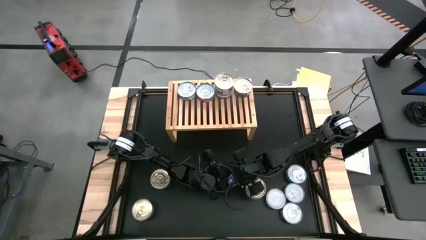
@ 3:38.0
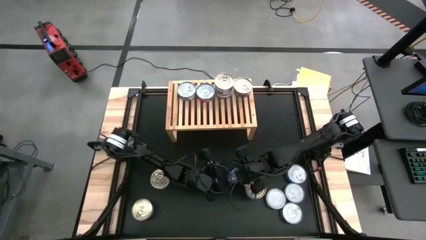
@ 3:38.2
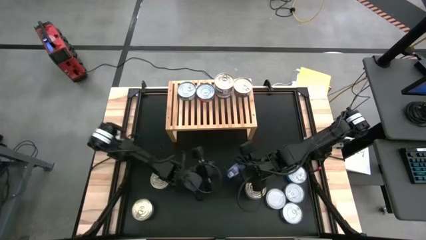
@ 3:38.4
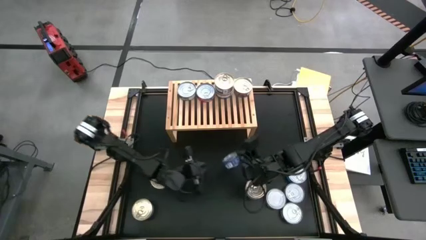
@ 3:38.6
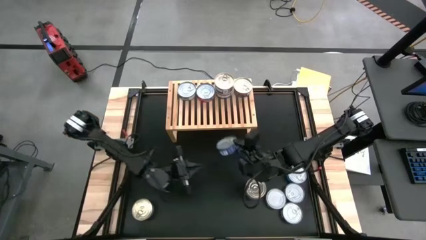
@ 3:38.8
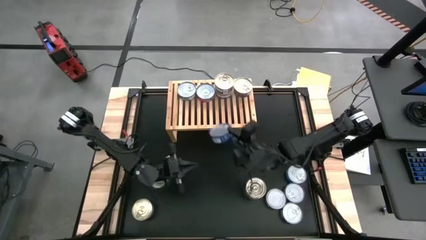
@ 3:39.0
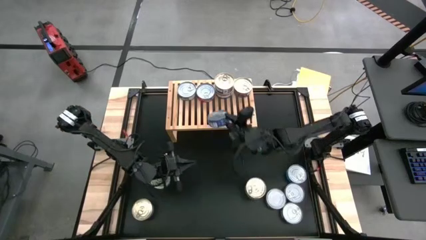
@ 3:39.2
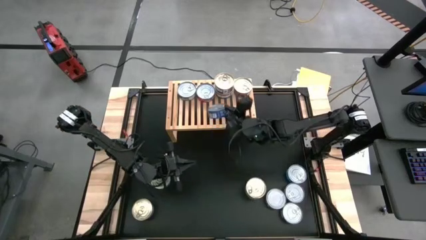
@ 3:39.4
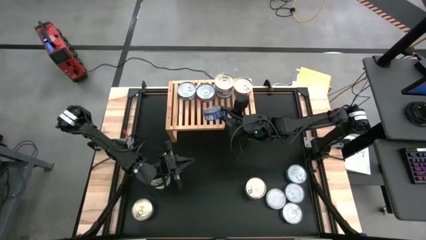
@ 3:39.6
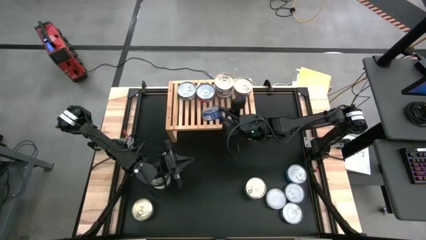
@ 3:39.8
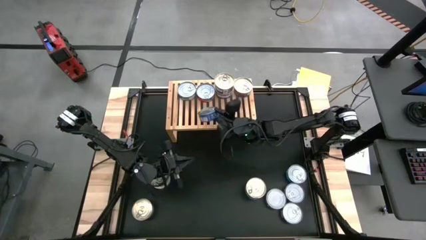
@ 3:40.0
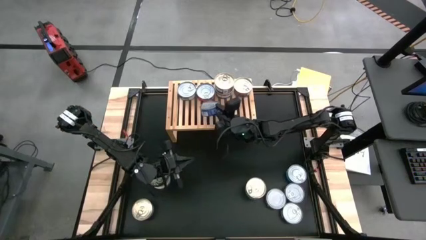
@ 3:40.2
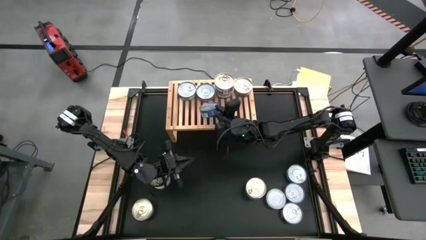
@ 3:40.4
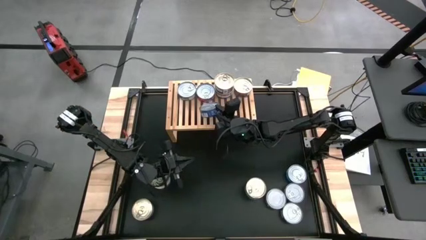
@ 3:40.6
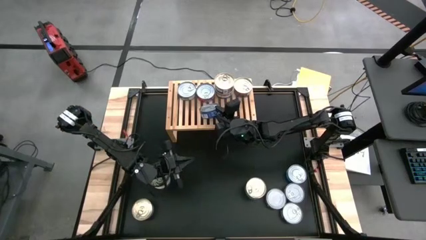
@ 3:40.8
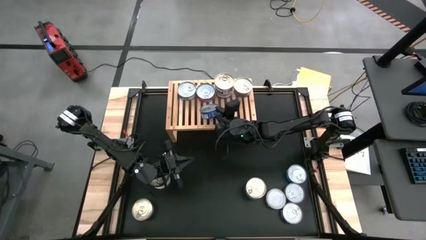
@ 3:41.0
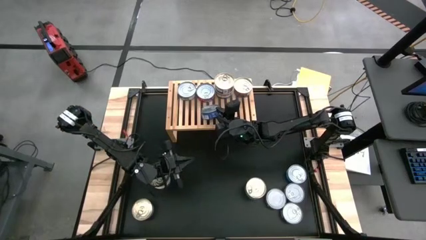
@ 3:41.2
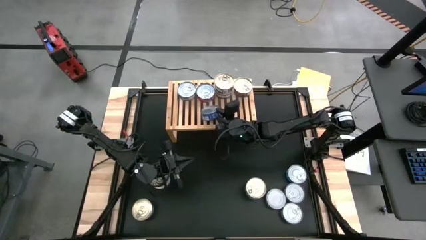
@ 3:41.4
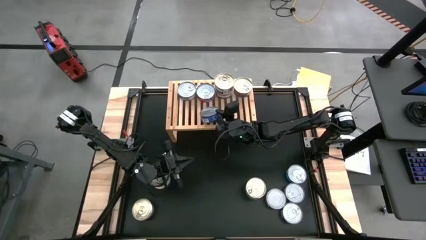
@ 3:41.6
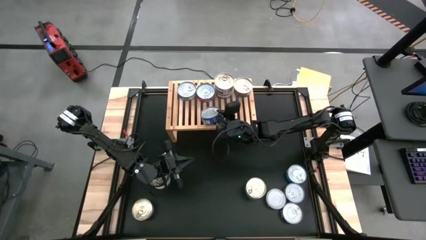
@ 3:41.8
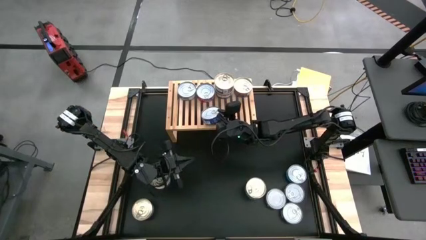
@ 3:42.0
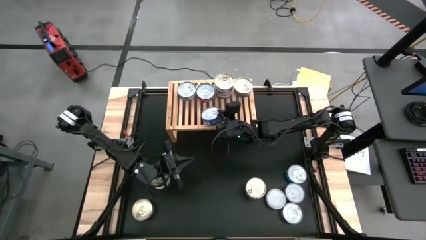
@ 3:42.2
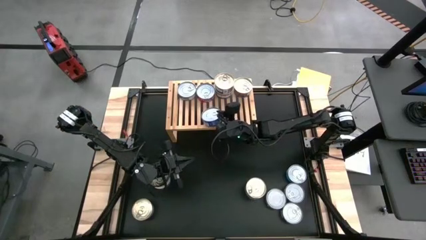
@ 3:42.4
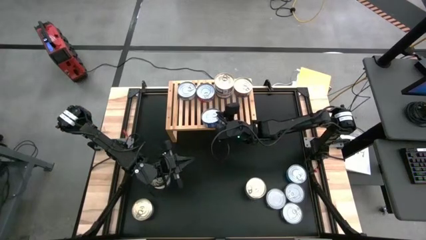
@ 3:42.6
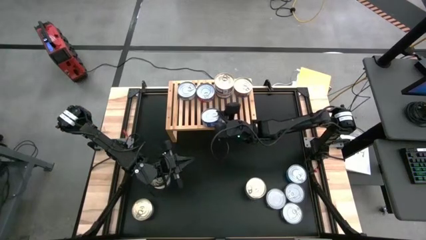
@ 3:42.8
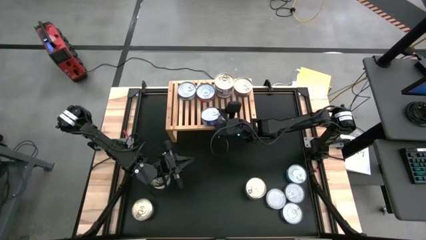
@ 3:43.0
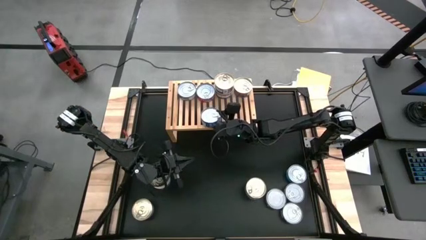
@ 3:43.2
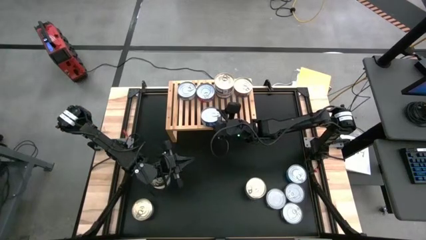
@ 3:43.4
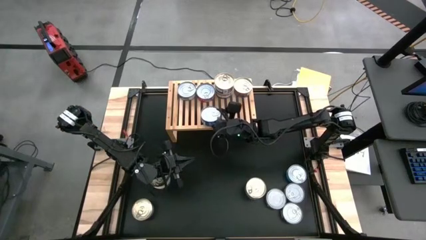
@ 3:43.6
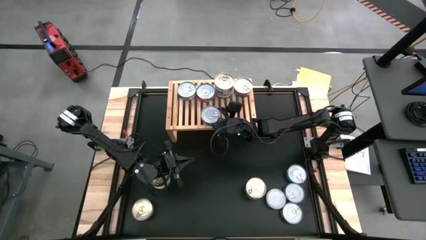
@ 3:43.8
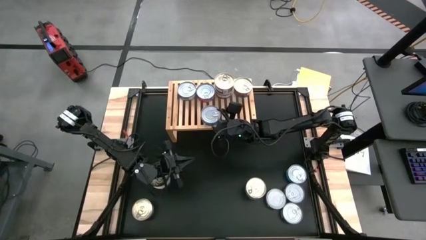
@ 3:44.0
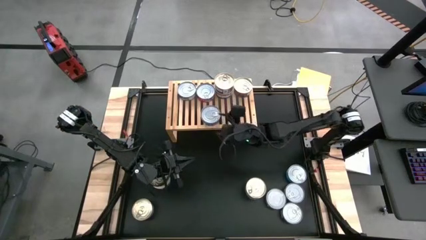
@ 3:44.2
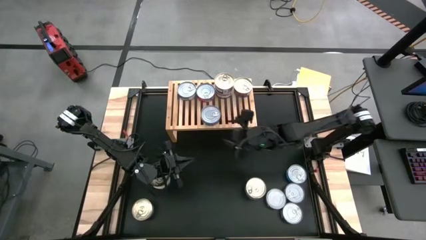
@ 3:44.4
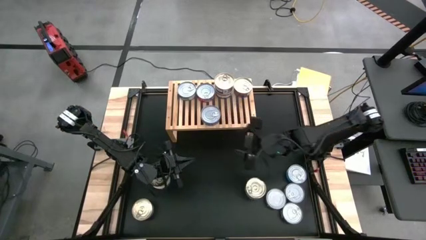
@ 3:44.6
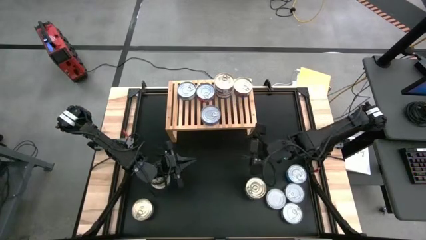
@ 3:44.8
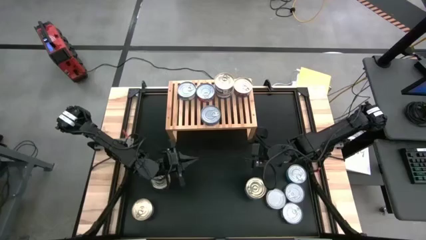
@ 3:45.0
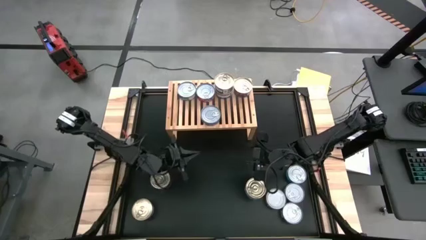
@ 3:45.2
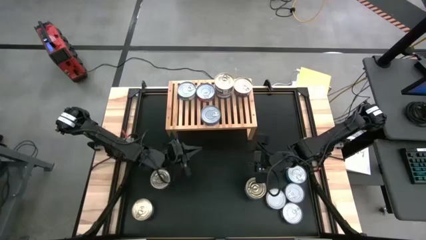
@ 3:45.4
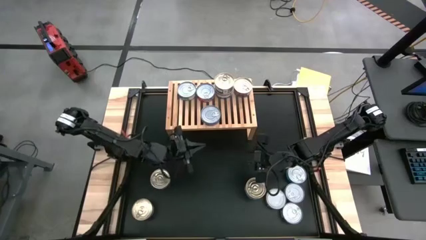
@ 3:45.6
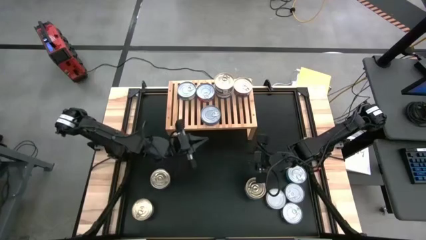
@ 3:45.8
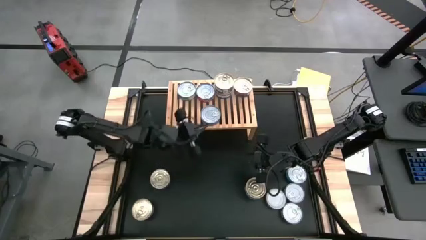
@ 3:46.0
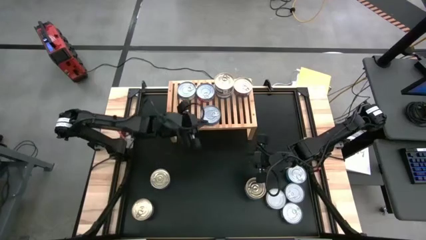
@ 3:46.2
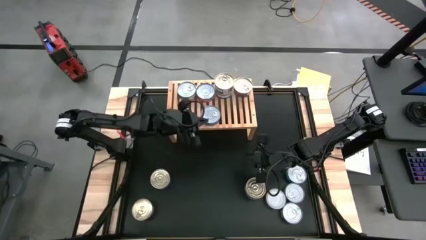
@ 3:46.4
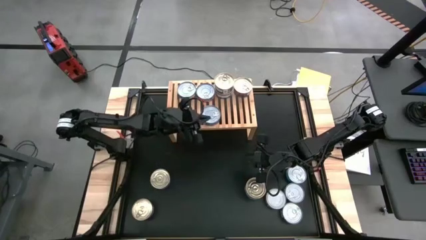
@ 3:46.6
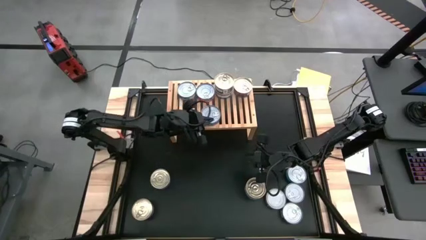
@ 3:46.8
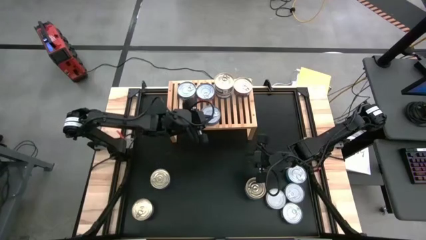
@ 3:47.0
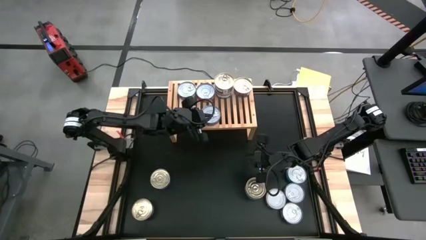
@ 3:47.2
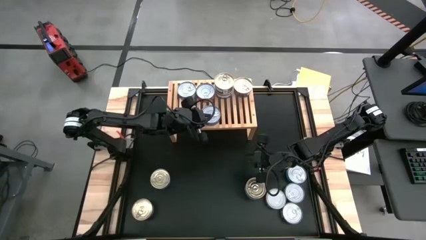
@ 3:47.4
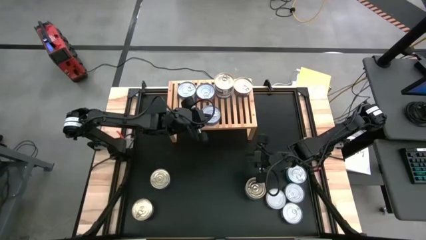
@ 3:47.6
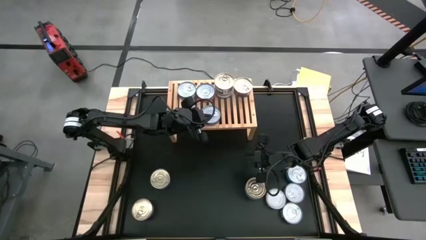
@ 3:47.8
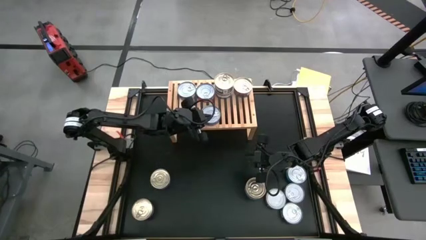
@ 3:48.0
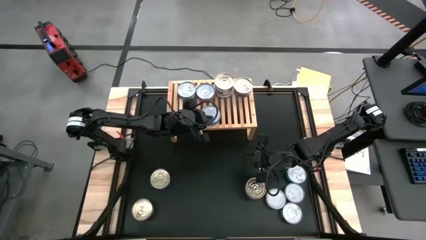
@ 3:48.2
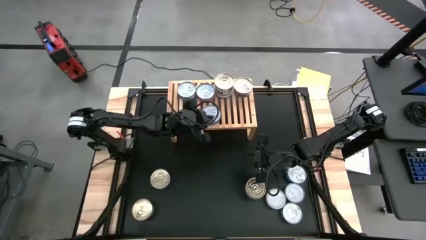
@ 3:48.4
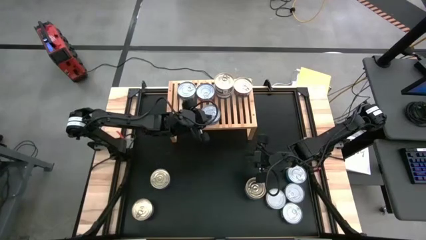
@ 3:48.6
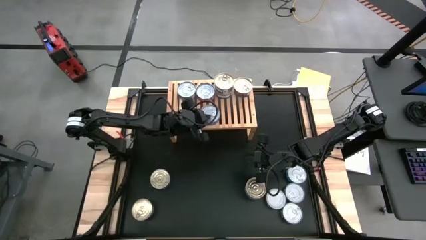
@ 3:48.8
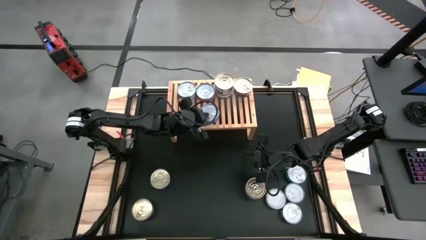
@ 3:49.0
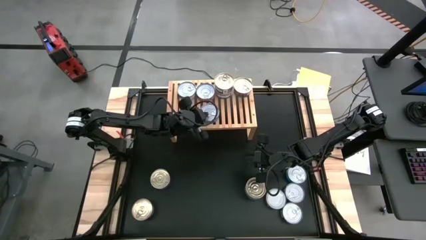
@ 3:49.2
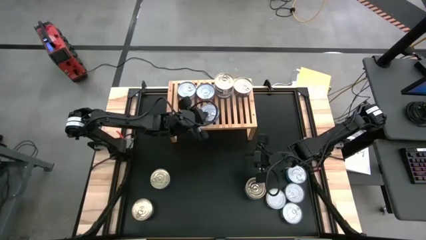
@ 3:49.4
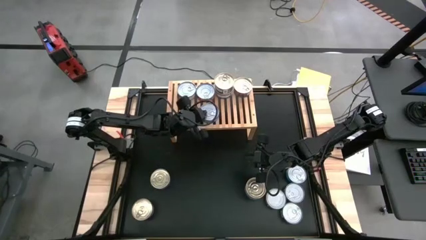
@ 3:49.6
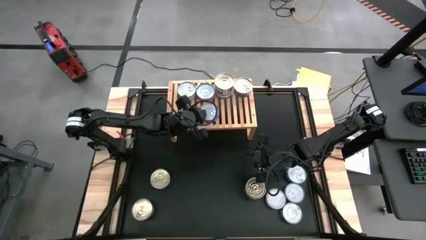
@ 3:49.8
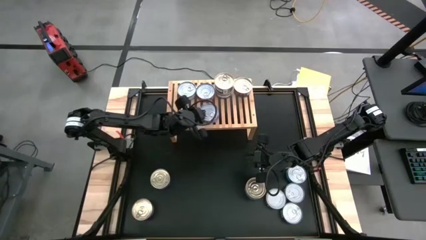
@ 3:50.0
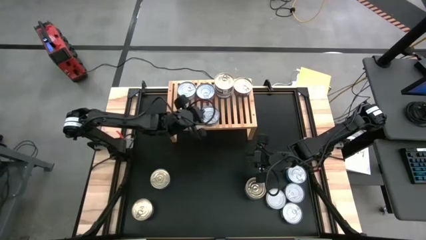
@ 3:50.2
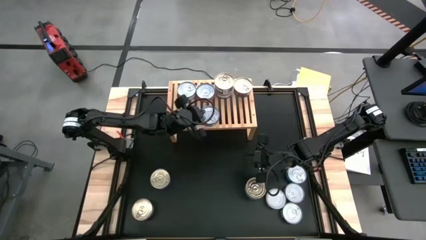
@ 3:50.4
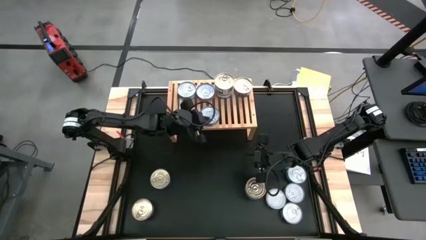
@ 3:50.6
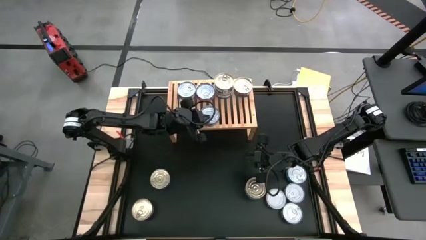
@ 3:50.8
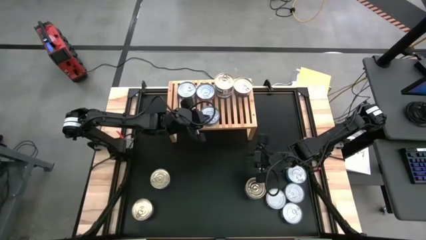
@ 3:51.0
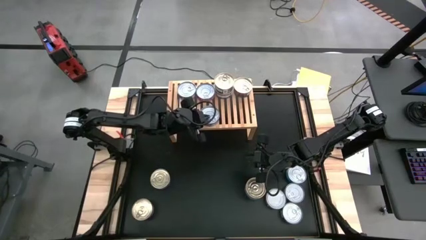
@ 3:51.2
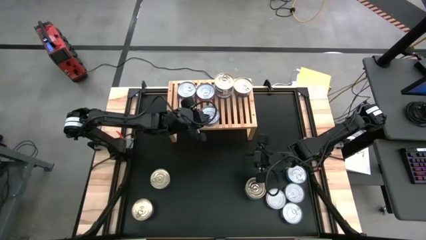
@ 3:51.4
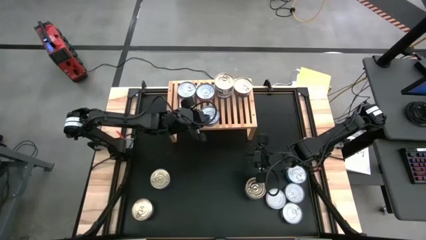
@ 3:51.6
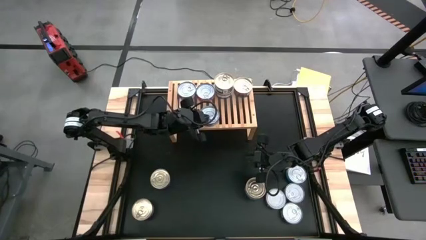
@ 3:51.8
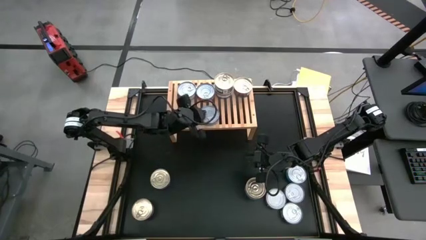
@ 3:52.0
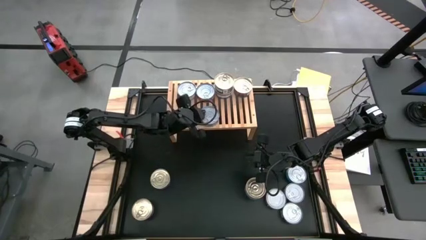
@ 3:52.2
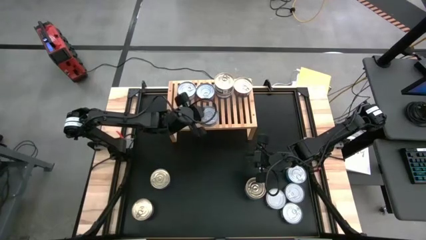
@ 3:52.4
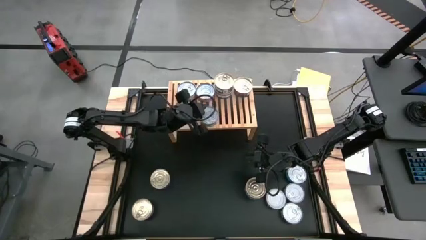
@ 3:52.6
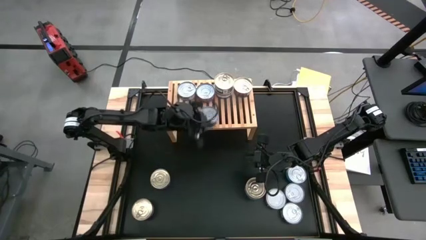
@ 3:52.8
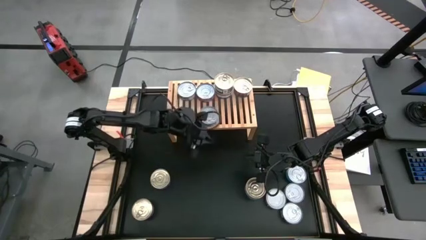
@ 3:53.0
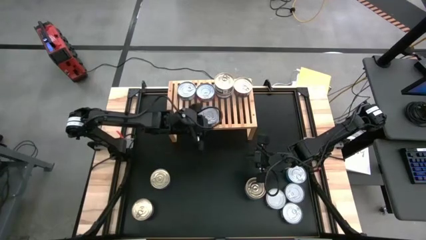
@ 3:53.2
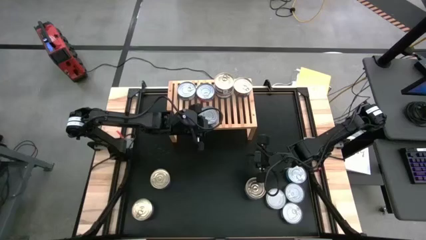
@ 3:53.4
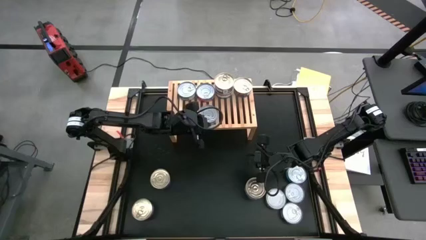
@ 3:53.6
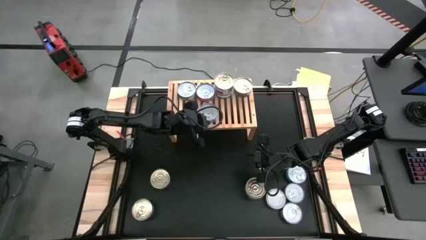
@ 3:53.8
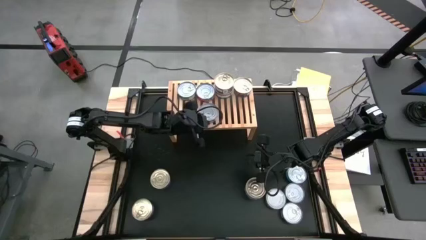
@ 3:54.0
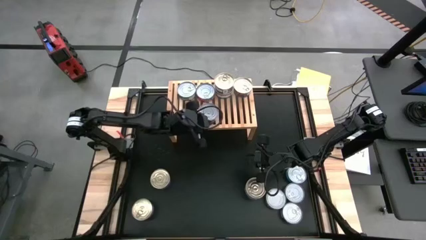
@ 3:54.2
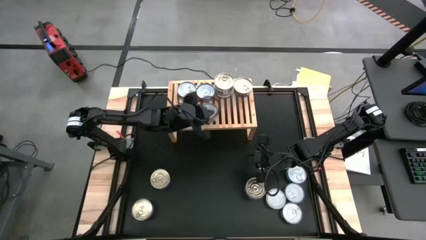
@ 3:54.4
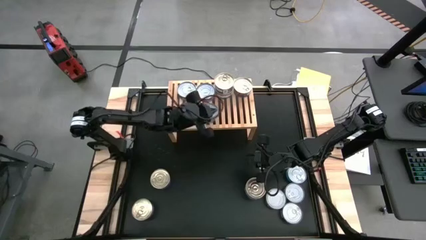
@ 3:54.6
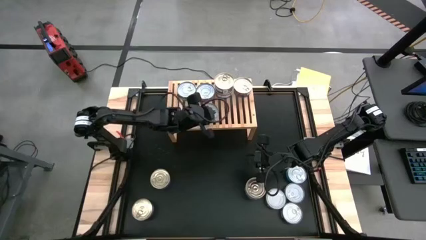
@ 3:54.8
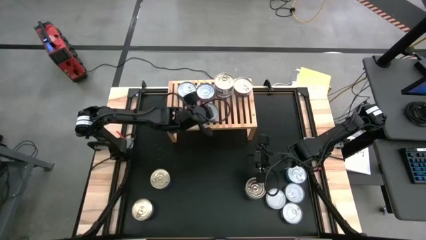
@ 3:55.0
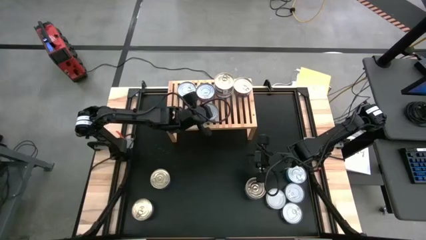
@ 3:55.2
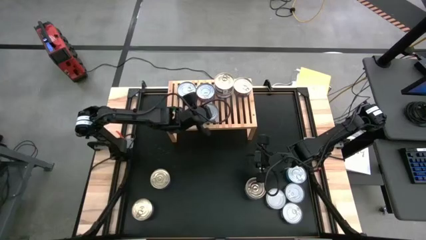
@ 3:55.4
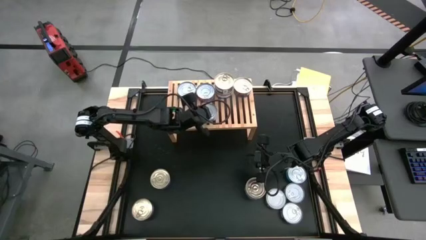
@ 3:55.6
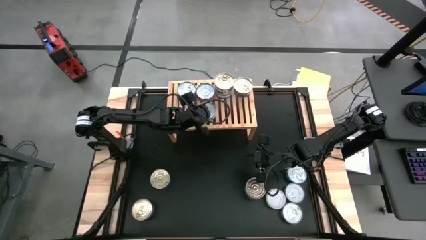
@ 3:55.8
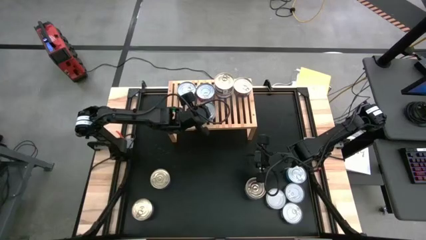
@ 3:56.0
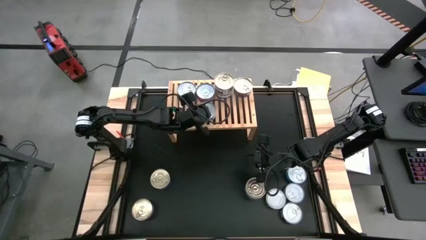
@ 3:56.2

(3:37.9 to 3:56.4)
Task: Stack canned seafood by type on shelf
Put the blue tuna can on the shelf aligned with the other red tuna can
